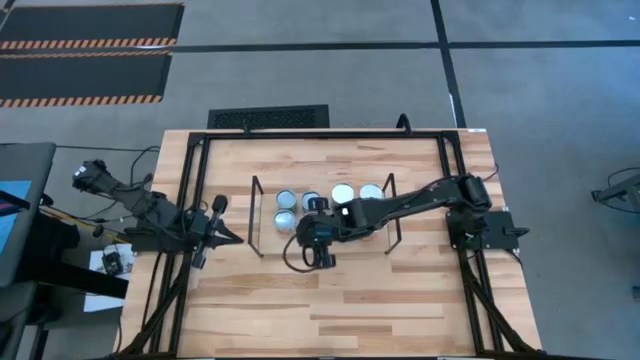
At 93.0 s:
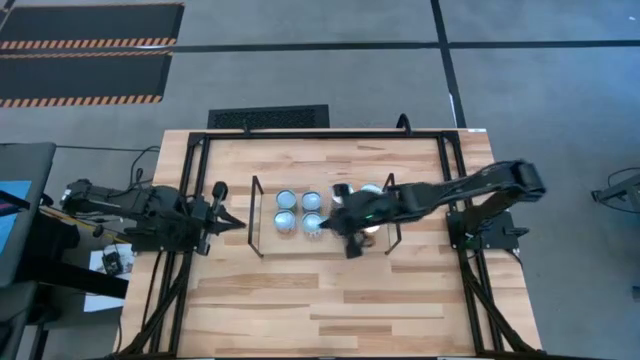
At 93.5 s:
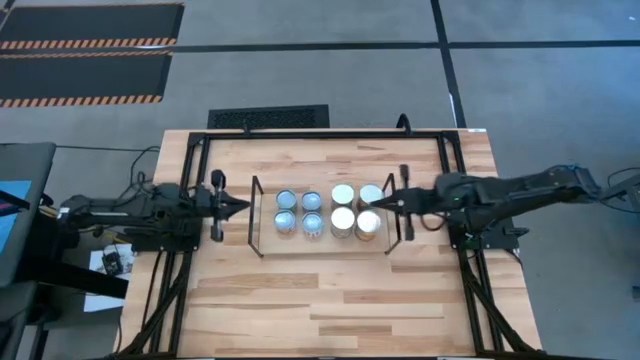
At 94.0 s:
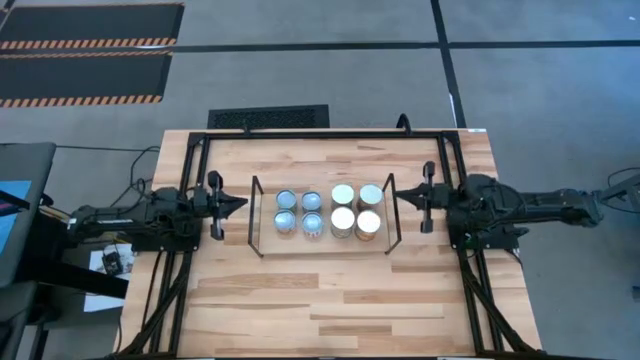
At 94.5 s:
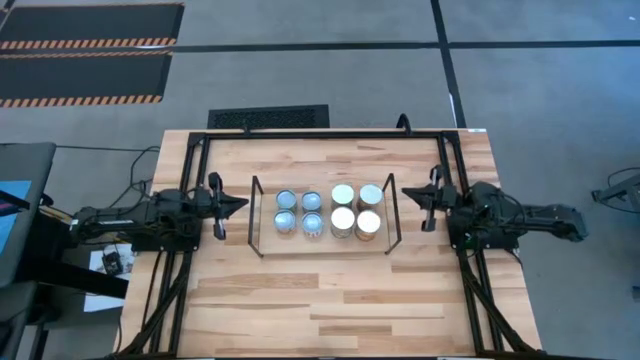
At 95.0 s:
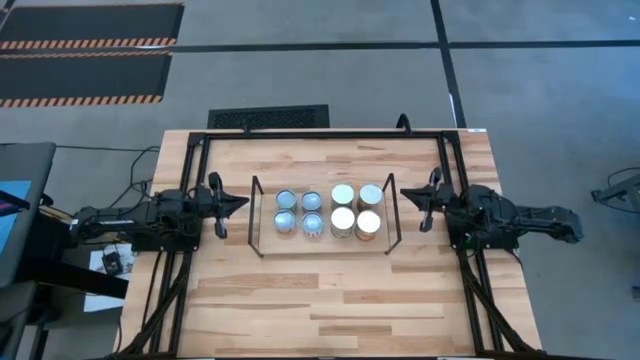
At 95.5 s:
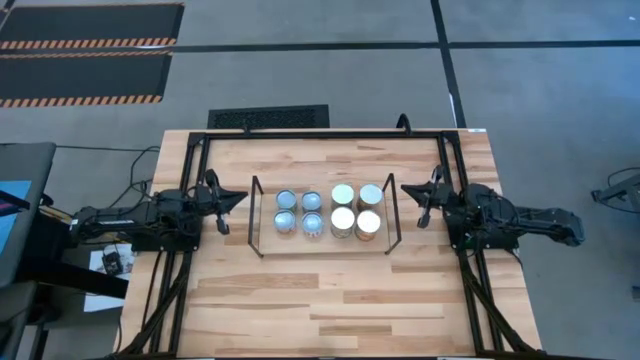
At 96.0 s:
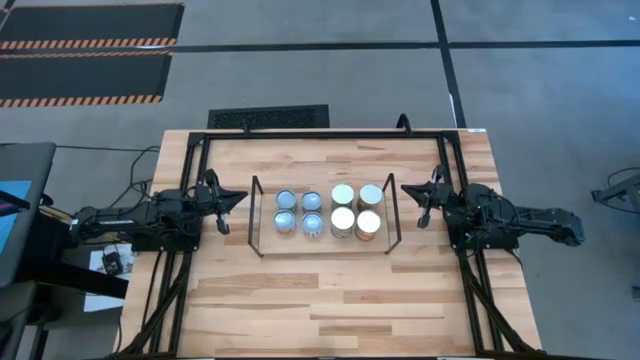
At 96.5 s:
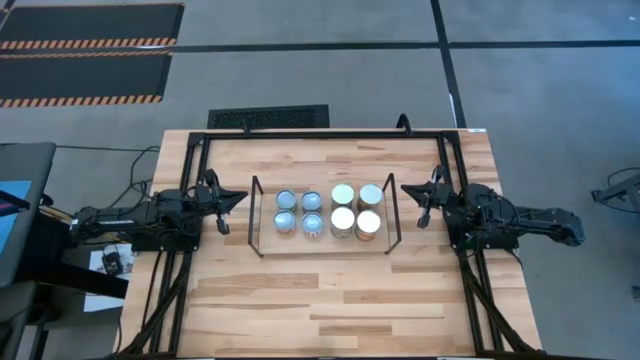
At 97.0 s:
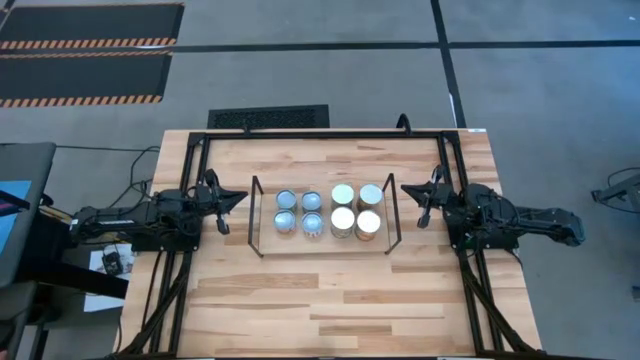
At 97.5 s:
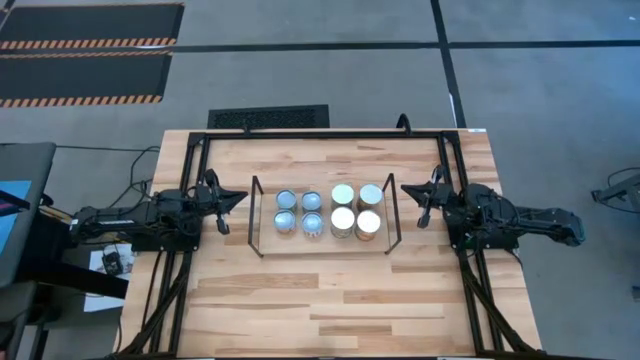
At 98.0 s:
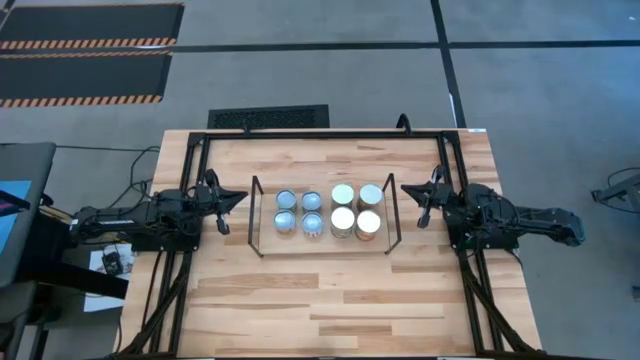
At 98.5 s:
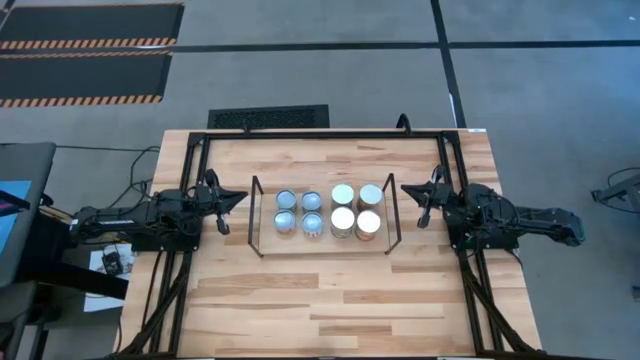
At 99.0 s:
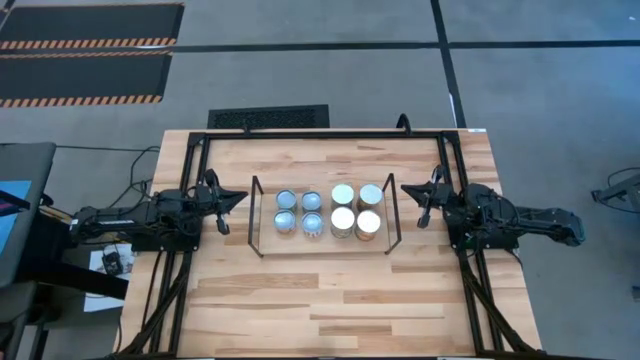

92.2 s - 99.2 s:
Task: Pick and place cans onto a shelf
Return to Home Position

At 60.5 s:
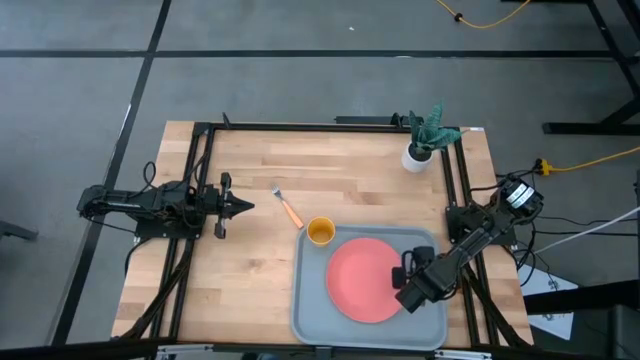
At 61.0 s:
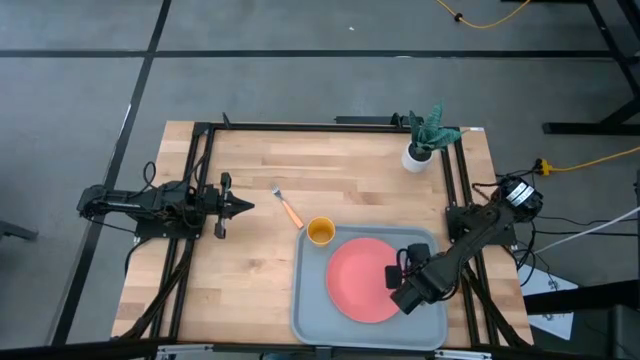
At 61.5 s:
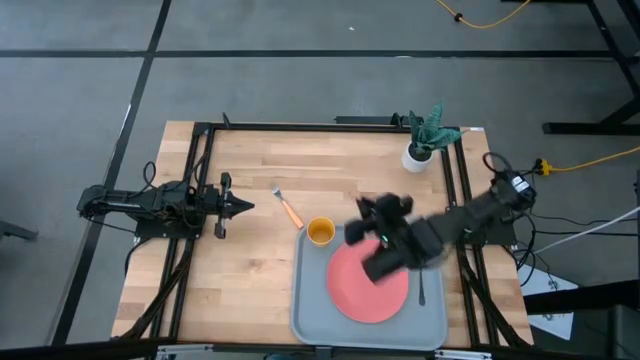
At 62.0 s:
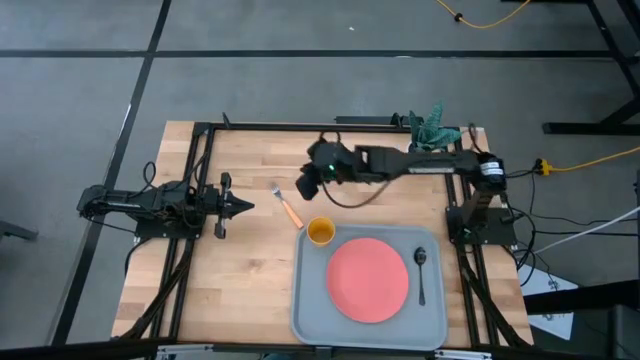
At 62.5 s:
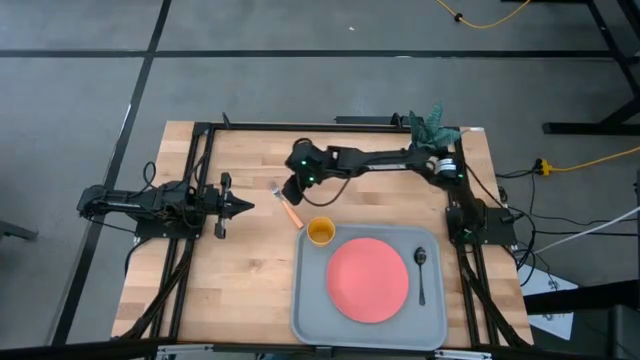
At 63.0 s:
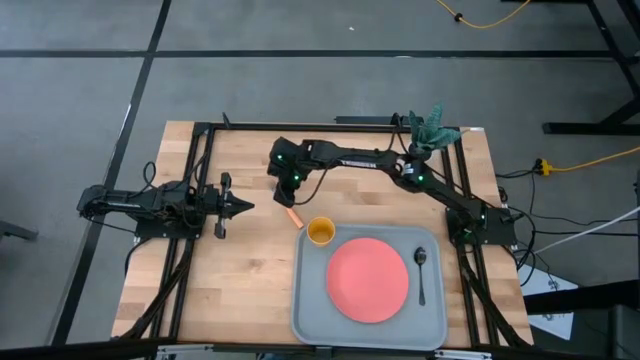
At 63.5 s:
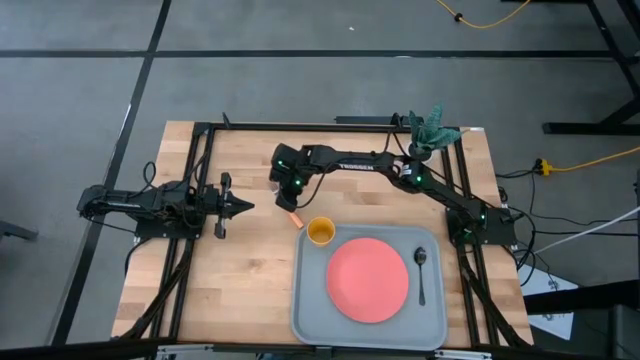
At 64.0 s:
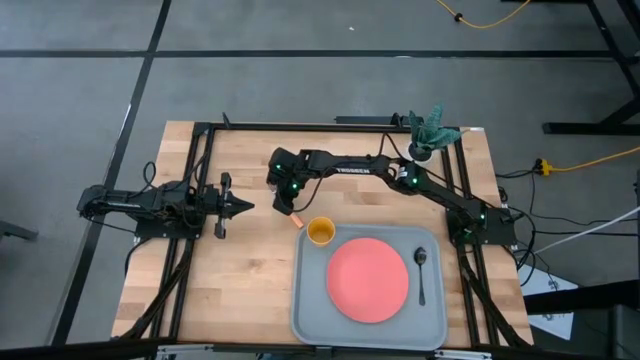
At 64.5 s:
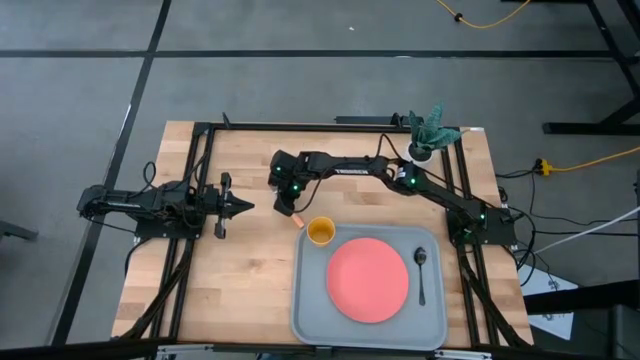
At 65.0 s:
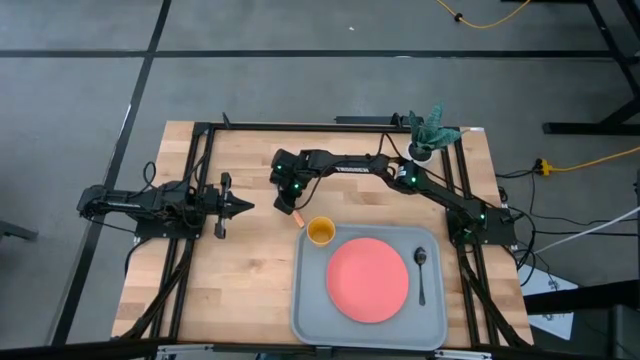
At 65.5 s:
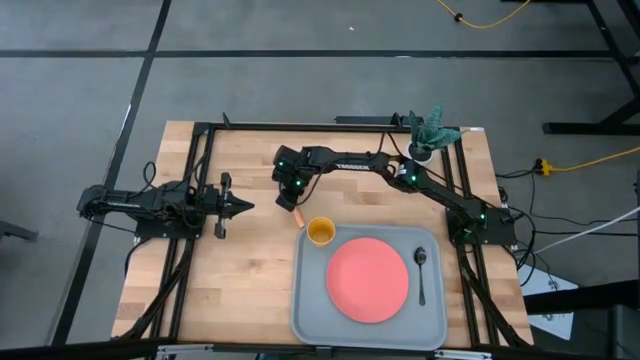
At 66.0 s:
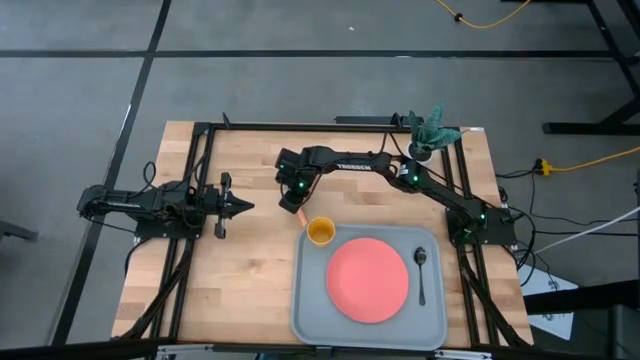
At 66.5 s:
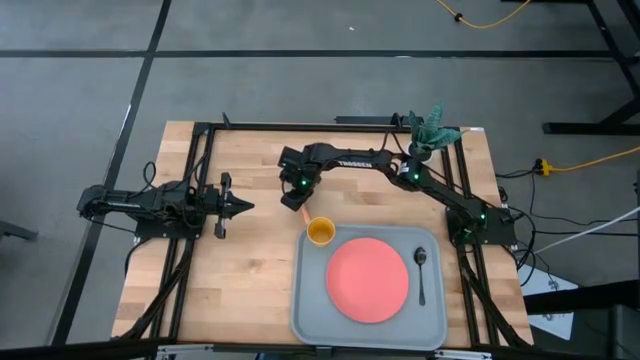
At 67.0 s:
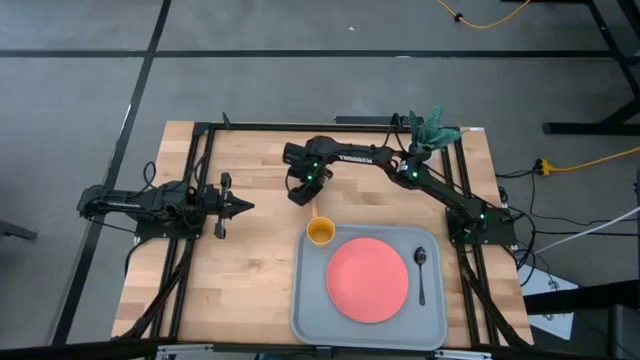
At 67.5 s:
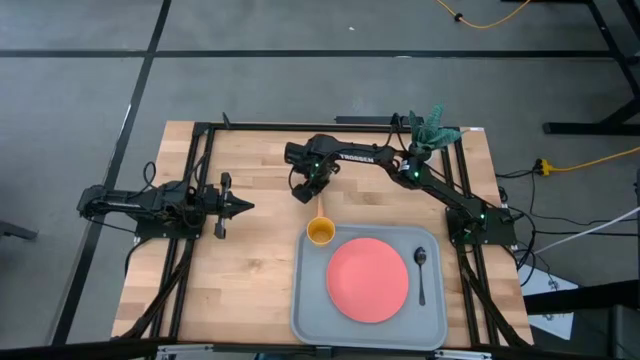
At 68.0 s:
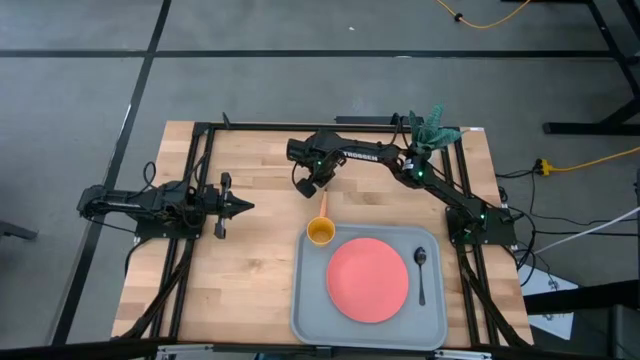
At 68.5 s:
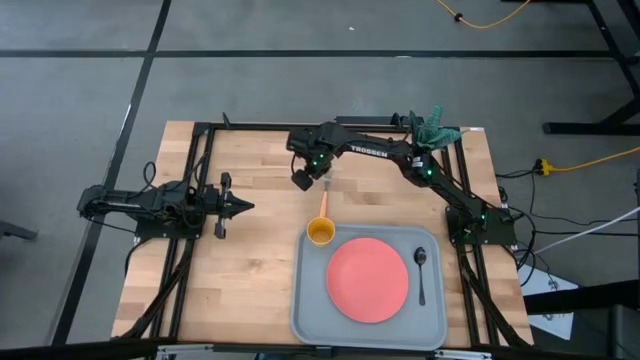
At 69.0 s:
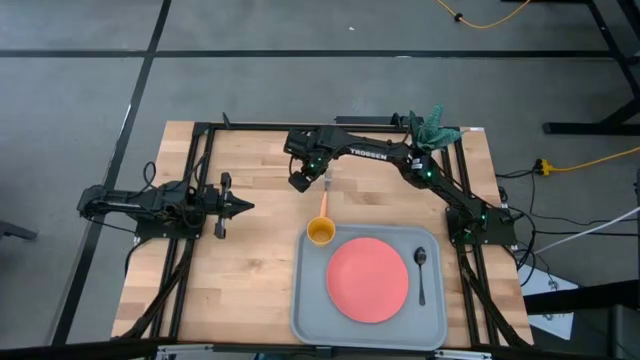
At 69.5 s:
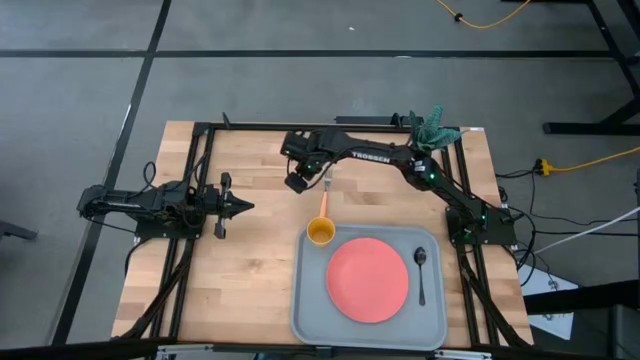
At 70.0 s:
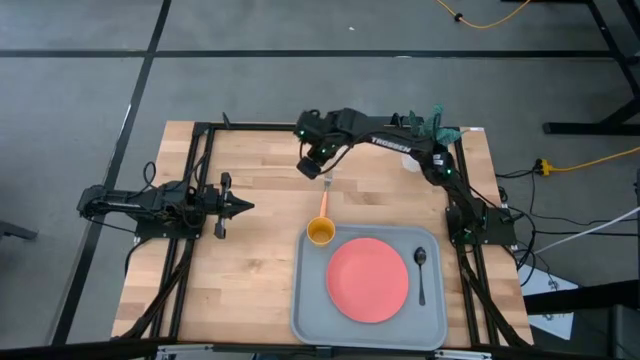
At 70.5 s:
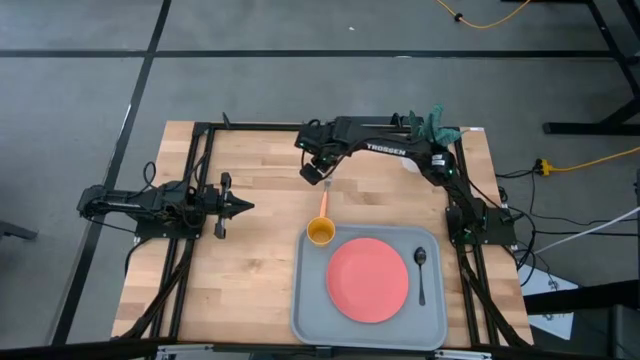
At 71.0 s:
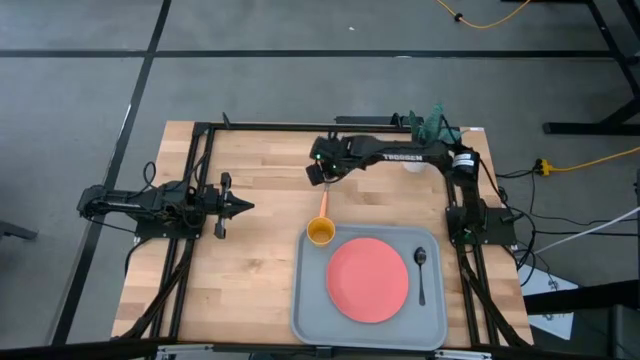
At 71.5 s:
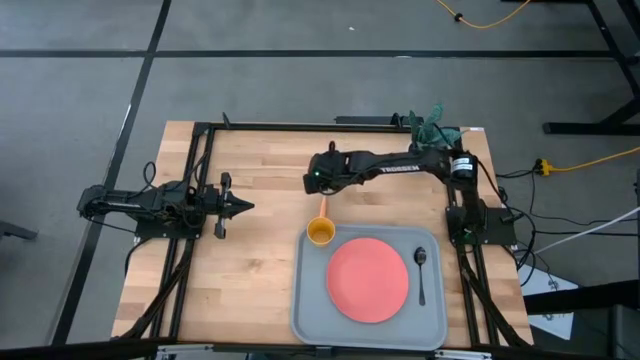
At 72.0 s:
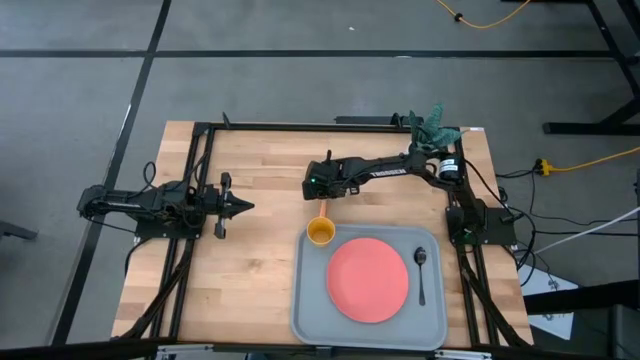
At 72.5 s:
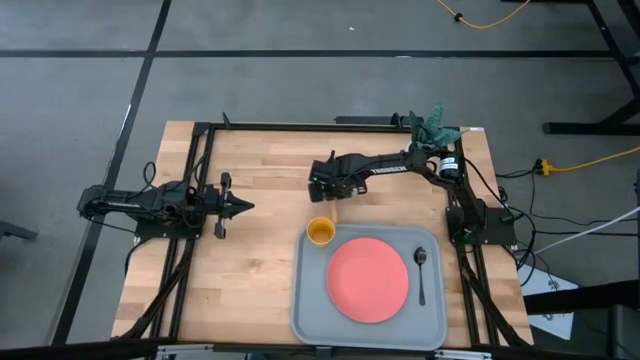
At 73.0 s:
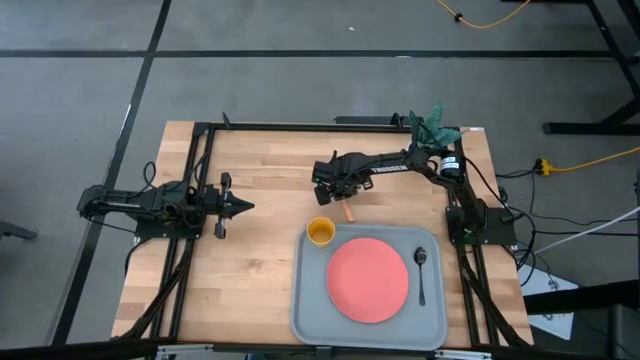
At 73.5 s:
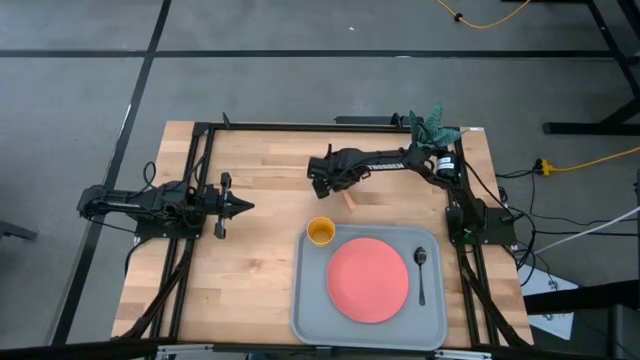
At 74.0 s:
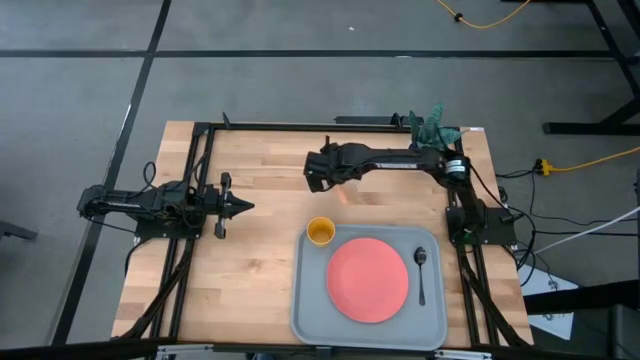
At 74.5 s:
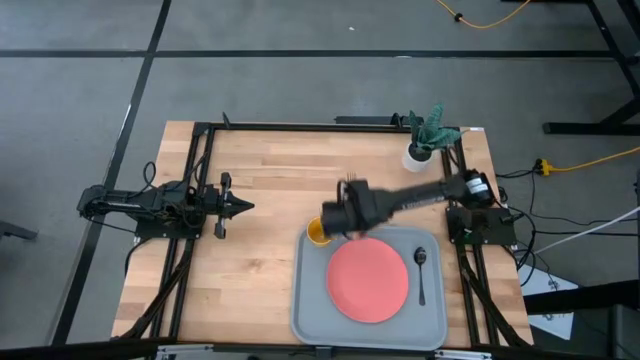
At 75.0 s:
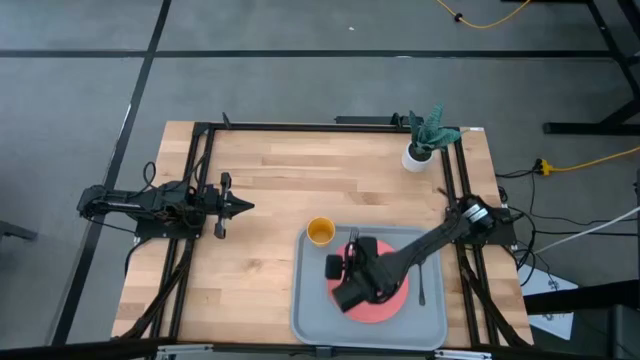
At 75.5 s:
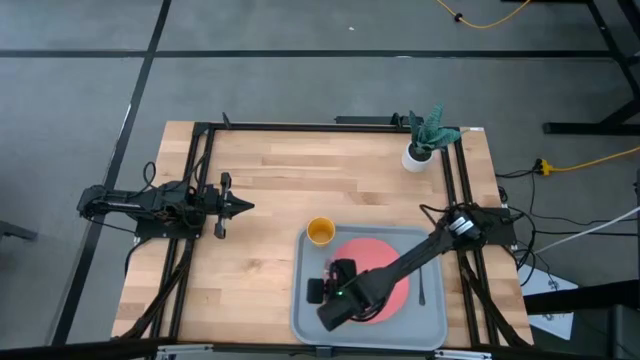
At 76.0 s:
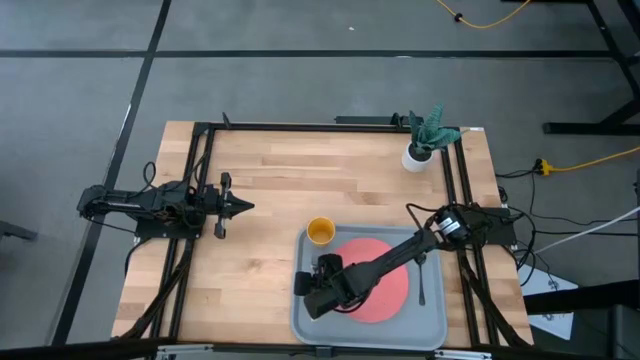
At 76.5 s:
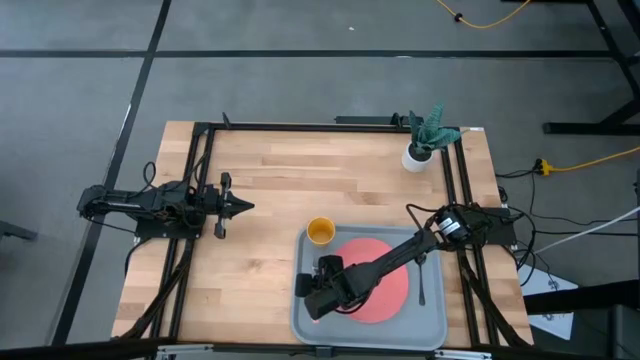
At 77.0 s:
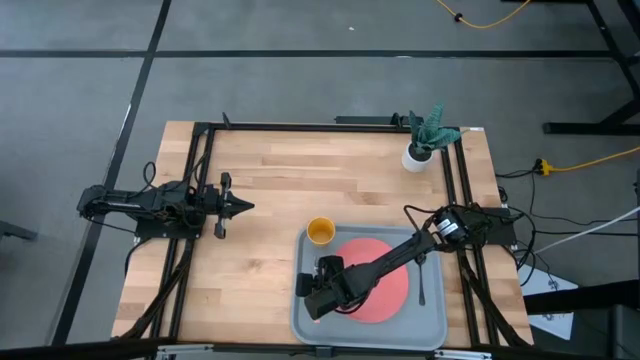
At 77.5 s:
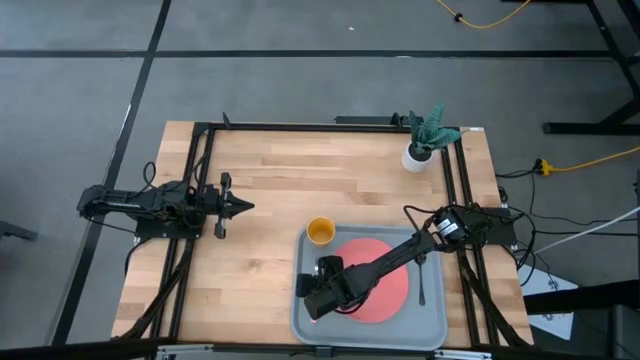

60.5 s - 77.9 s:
Task: Pick and place plate/cup/fork/spoon on tray
Put the orange fork on the light blue tray
